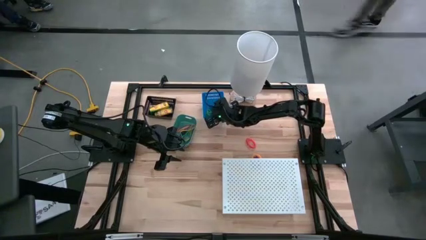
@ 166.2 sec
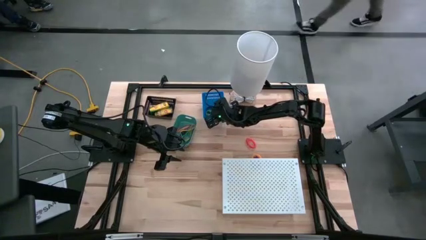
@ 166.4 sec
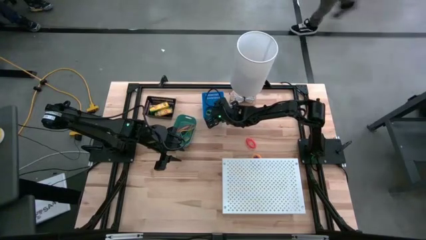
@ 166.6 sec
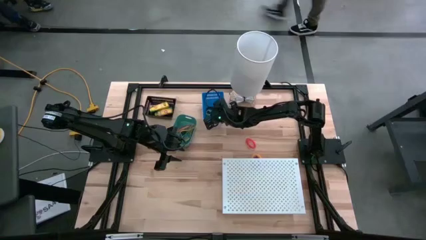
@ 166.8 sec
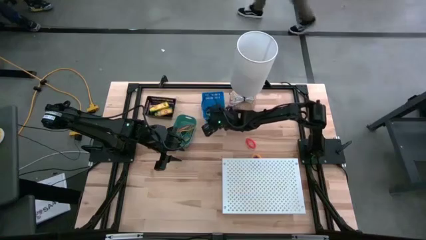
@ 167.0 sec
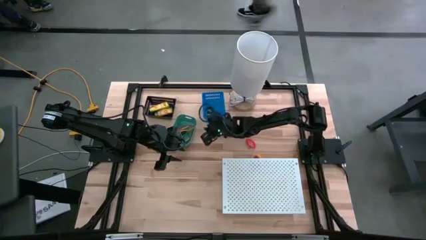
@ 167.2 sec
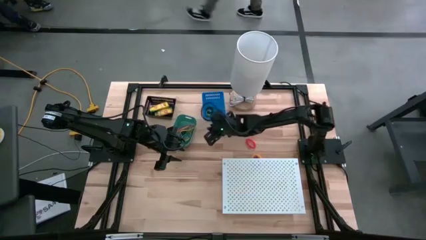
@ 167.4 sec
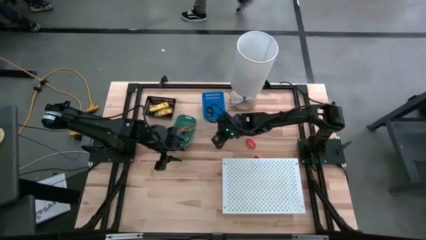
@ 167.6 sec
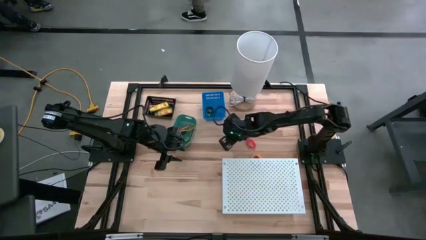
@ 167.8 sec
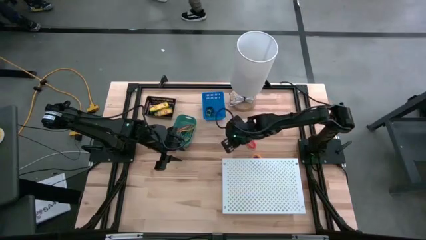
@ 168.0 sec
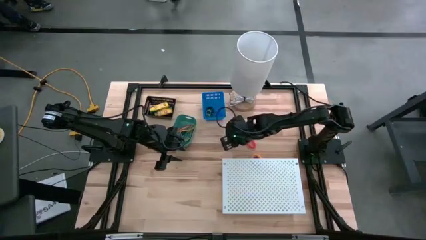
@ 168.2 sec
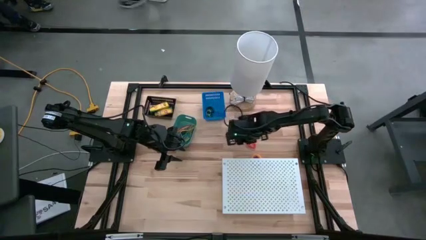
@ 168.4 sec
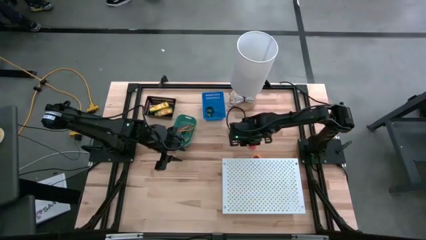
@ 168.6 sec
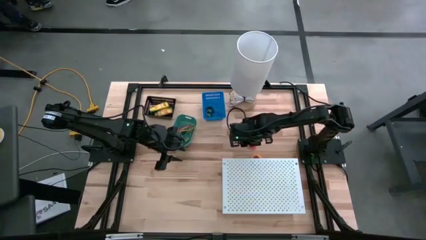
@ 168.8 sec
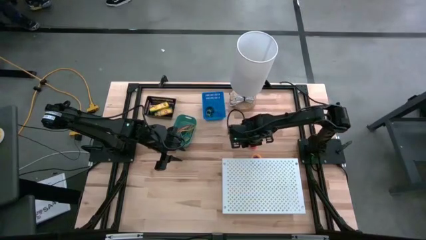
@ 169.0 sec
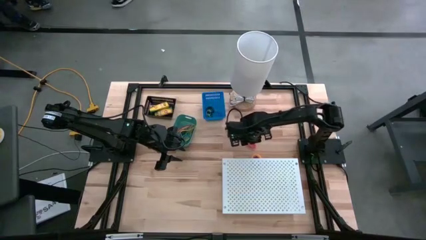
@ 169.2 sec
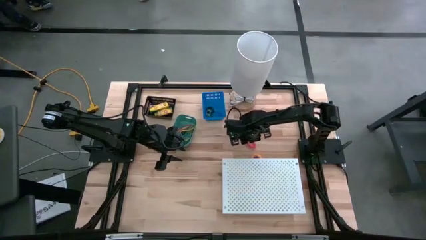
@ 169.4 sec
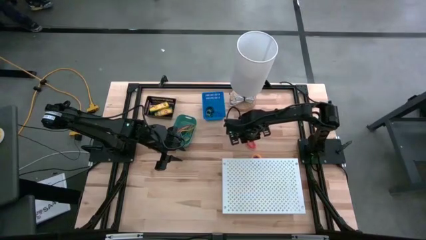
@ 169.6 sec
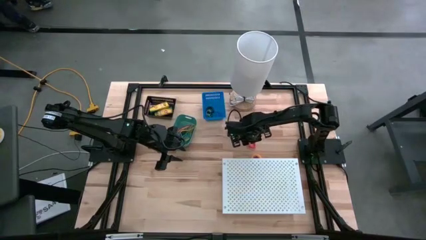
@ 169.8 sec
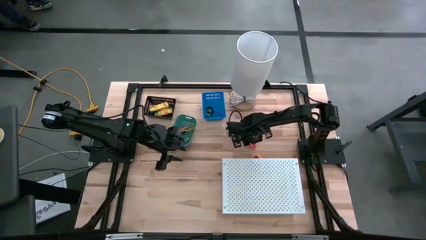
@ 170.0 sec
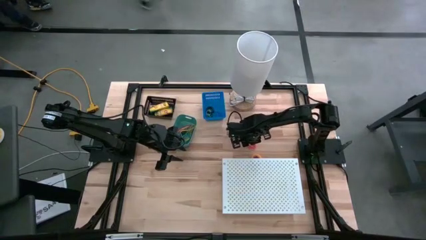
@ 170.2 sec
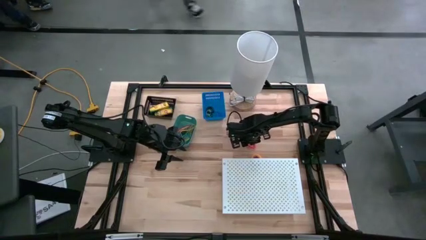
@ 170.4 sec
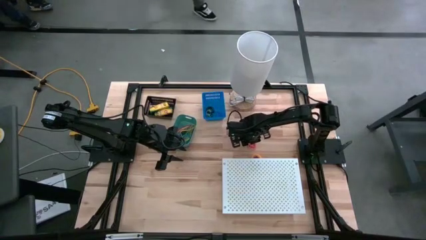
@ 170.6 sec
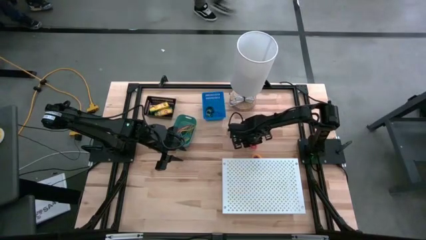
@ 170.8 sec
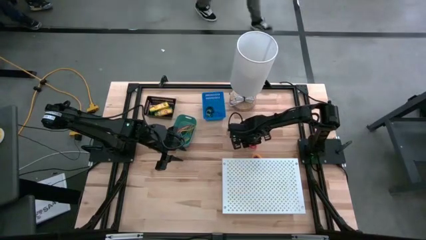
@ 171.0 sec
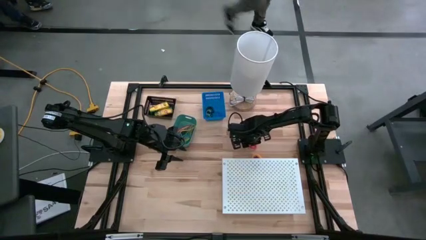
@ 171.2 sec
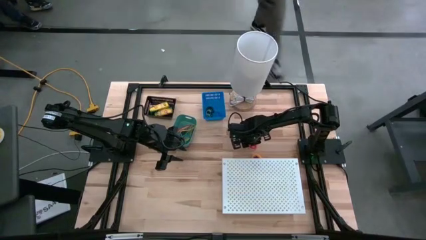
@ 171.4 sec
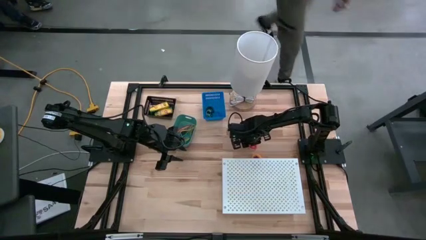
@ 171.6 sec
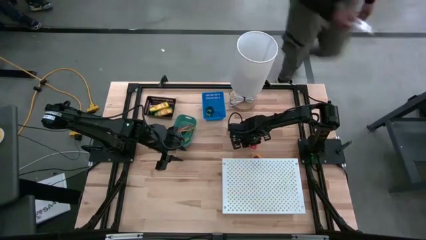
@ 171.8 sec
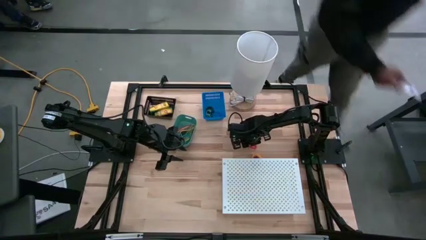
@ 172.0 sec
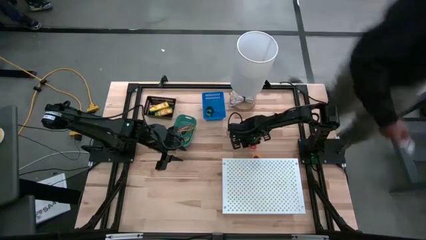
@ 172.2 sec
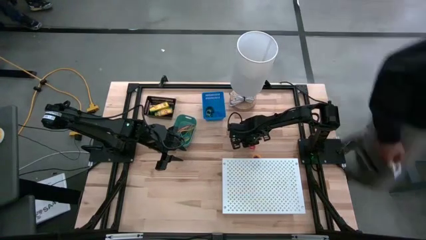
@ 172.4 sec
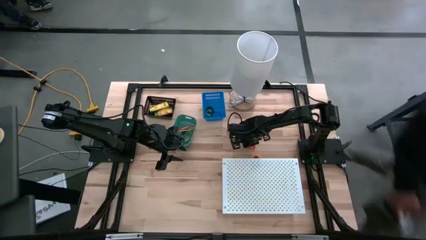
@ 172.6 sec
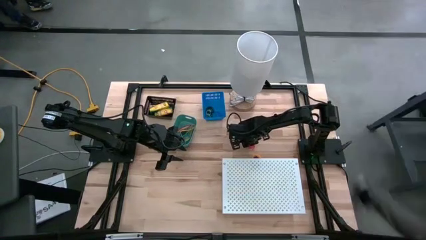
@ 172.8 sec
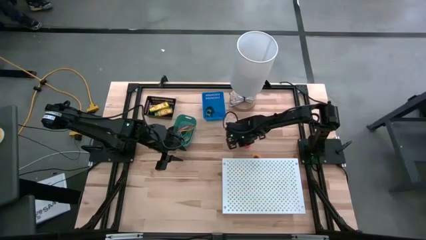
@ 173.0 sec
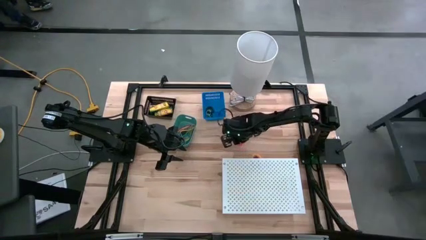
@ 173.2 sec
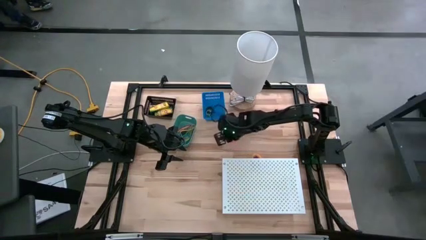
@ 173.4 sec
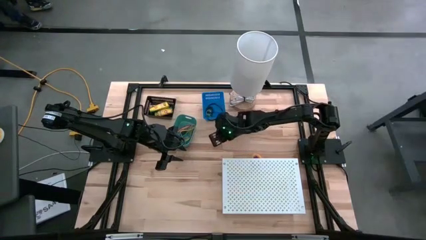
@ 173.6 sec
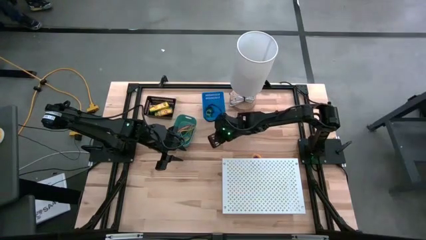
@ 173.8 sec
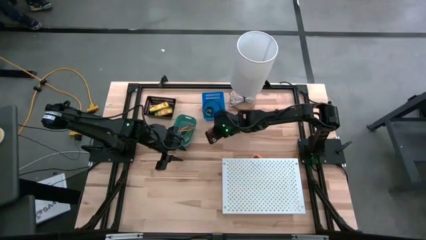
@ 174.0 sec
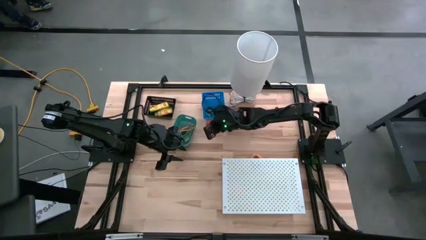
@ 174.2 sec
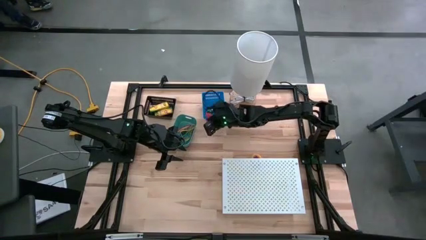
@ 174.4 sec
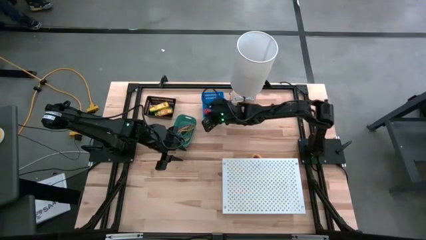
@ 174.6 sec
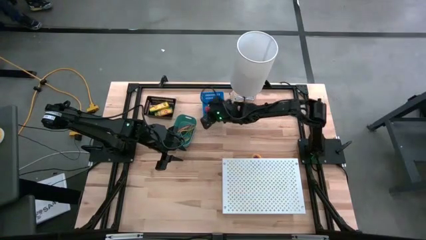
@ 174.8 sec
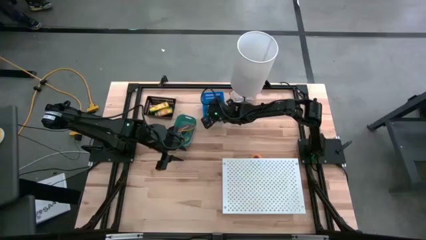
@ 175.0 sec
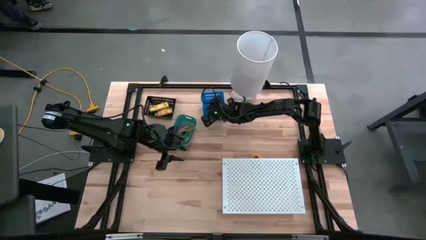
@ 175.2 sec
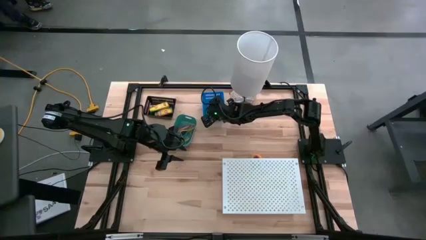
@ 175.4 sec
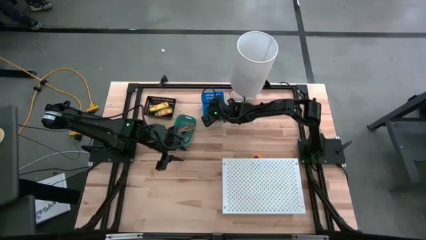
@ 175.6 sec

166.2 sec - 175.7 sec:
Task: Pick & Place Office Desk Supplies
Put the orange spring keychain into the blue bin

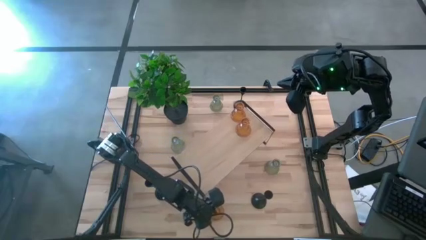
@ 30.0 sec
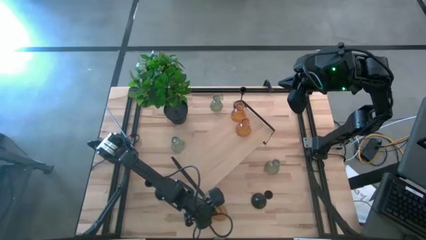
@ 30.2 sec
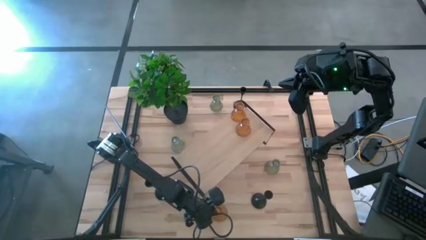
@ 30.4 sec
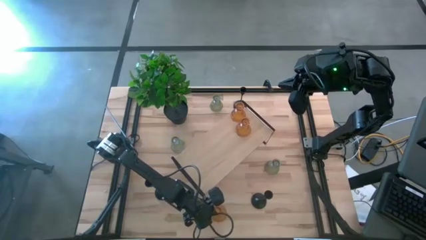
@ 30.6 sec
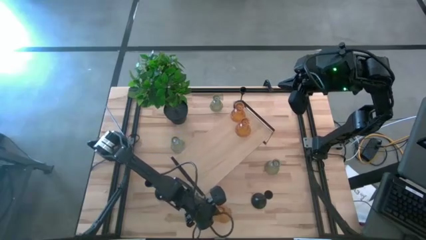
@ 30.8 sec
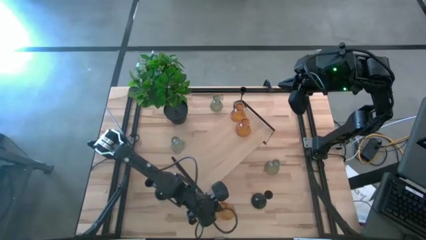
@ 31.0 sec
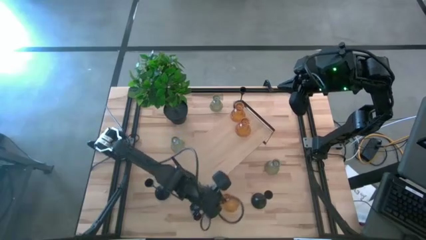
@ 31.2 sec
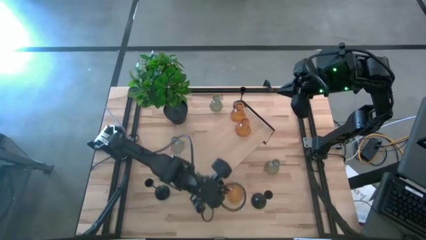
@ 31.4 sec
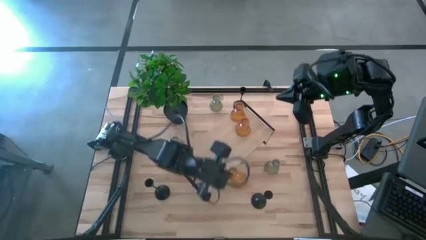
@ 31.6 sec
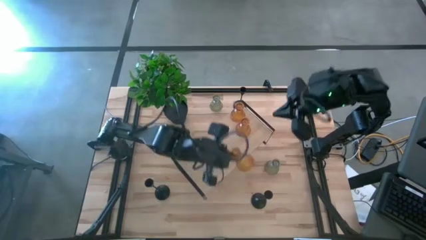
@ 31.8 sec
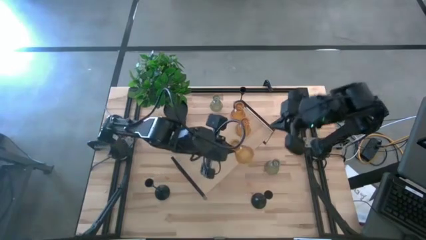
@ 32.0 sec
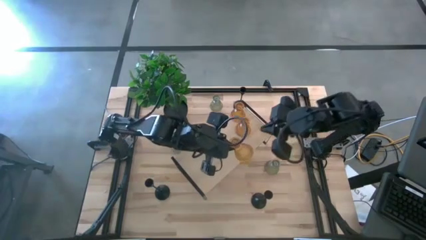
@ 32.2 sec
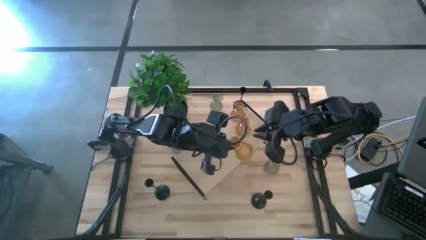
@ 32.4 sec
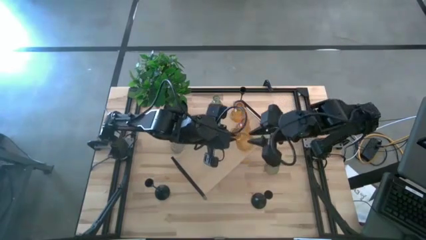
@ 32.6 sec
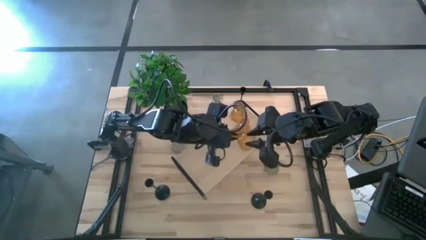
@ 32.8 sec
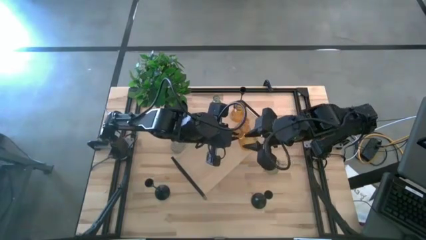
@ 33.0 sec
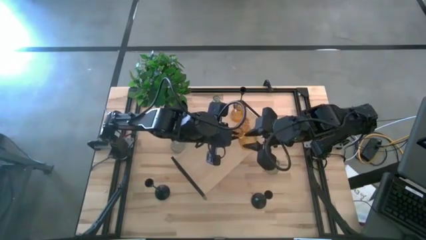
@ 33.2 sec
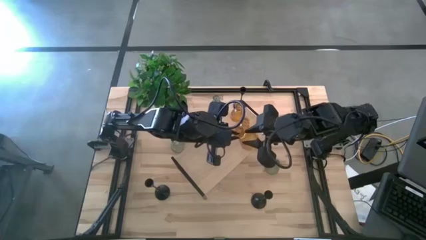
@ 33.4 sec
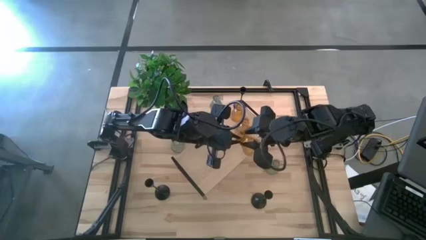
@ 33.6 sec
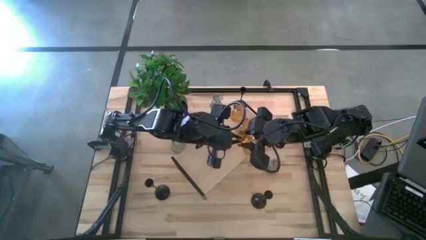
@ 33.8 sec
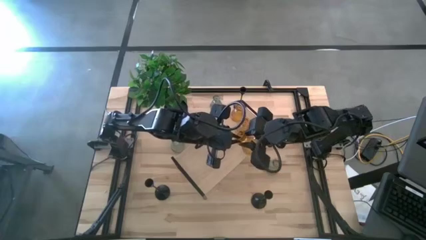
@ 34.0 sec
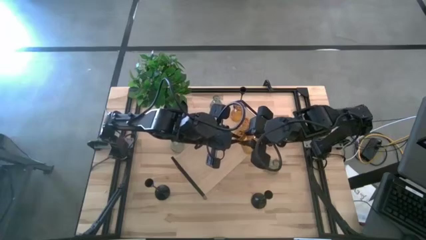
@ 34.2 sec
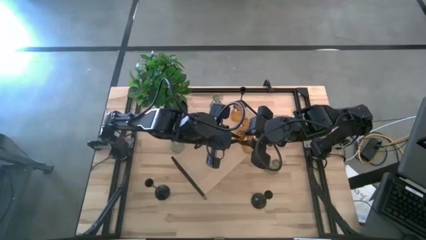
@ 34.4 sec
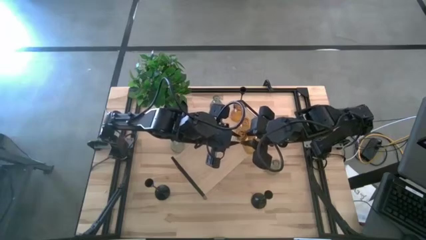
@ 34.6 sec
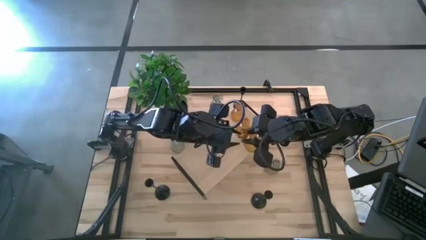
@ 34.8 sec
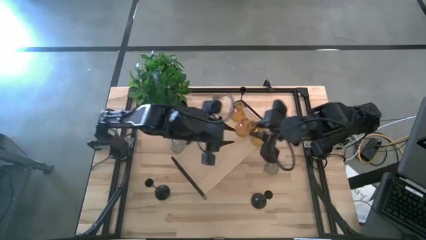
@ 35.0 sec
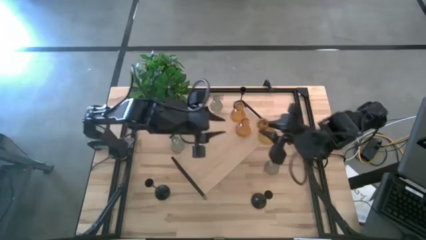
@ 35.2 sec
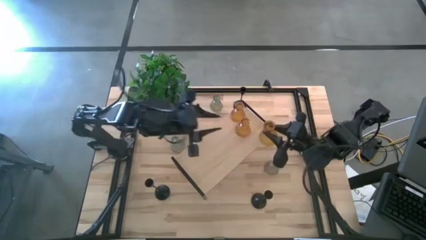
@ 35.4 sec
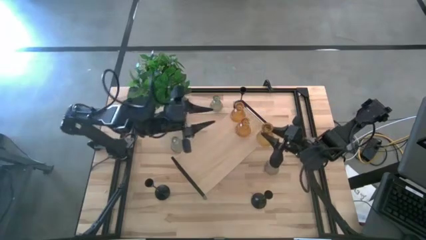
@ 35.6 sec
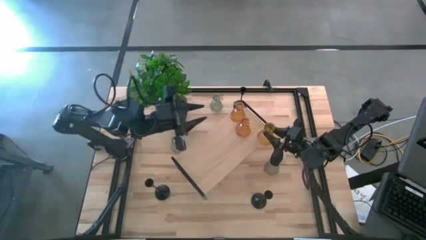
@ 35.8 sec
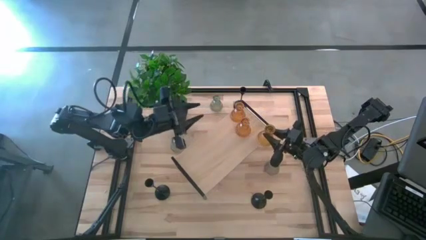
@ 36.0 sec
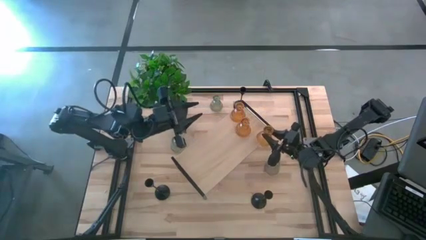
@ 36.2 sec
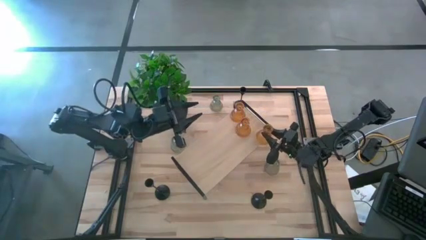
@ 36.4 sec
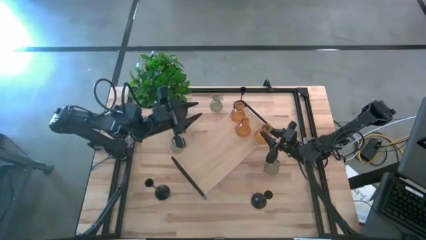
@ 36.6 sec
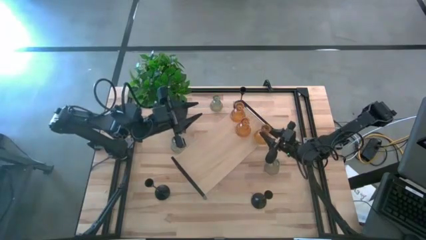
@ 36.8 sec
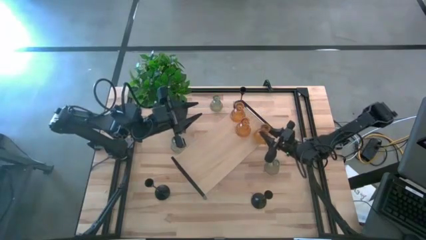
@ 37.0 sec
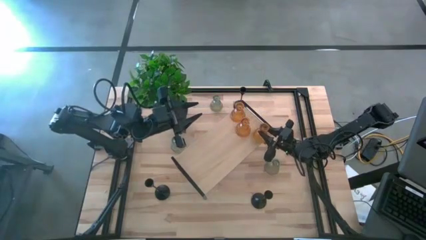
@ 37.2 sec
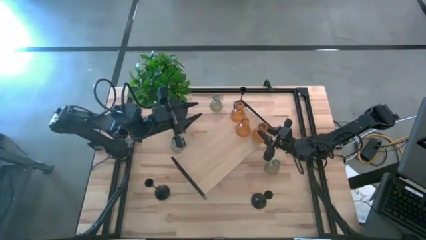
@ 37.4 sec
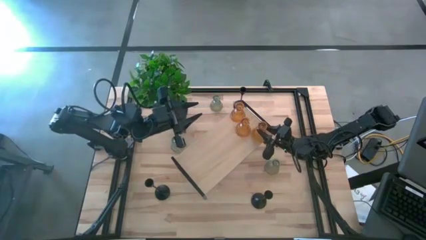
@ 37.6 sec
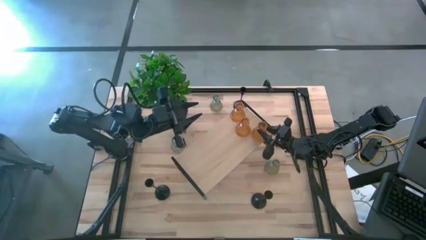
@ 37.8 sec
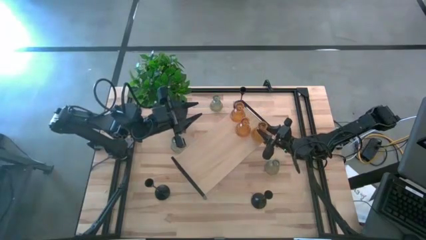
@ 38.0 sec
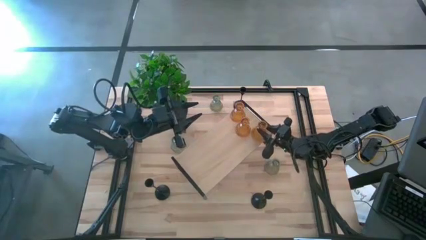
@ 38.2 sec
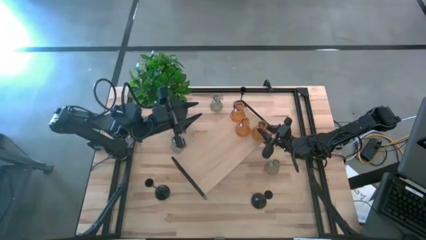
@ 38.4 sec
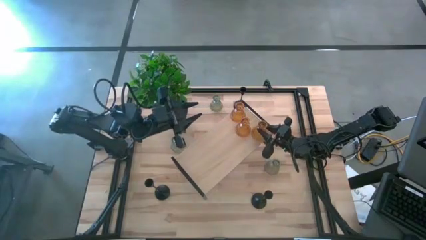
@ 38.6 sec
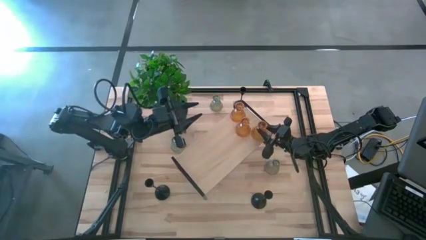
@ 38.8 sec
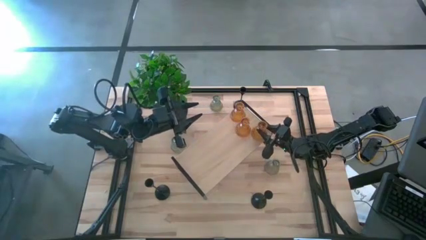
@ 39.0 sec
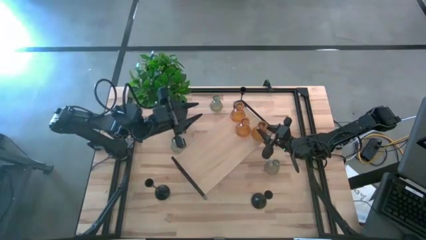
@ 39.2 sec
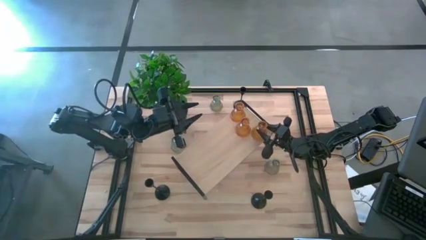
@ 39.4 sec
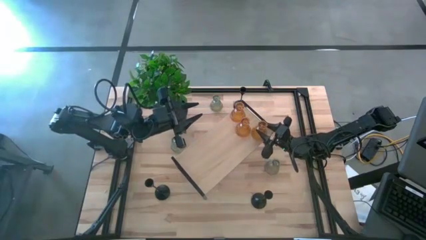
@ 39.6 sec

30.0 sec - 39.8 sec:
Task: Pick & Place candle stick holders
Put the yellow glass candle holder on the shelf
